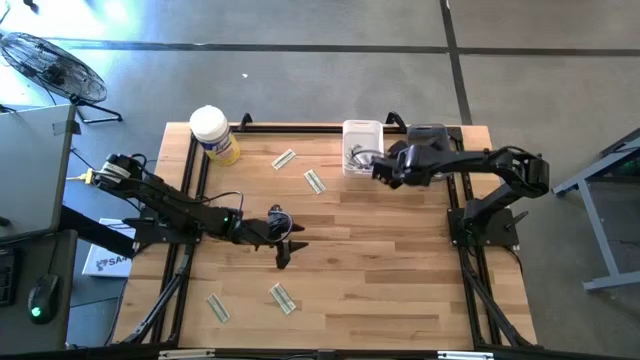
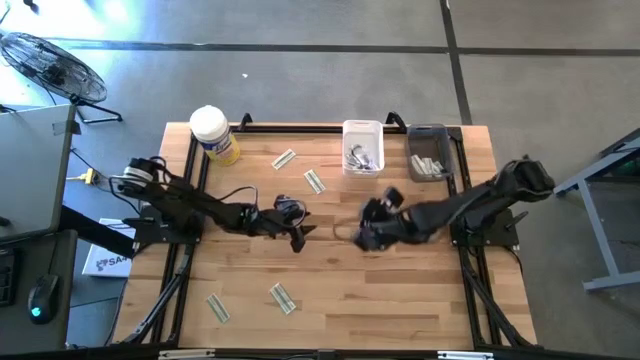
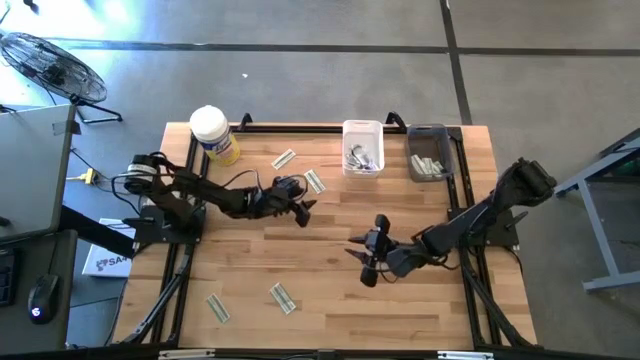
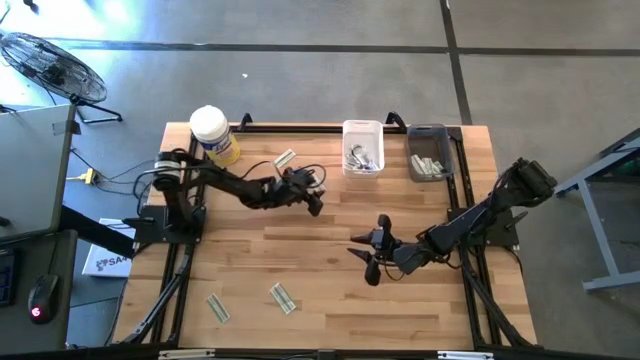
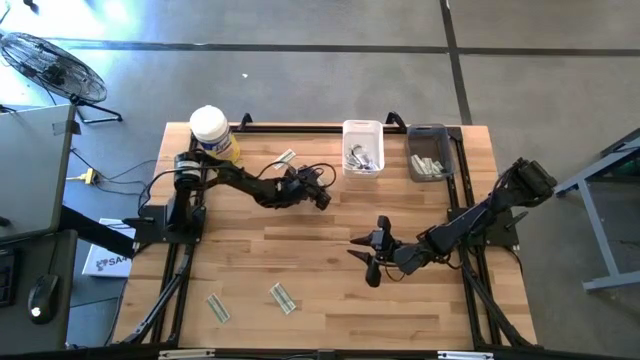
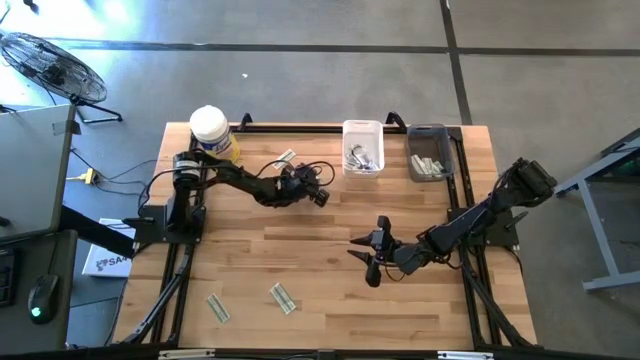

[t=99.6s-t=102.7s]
Task: Pick & Place First Aid Supplies
Put the green bandage into the black bin

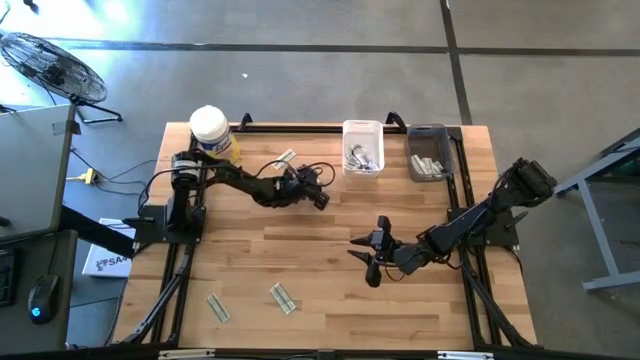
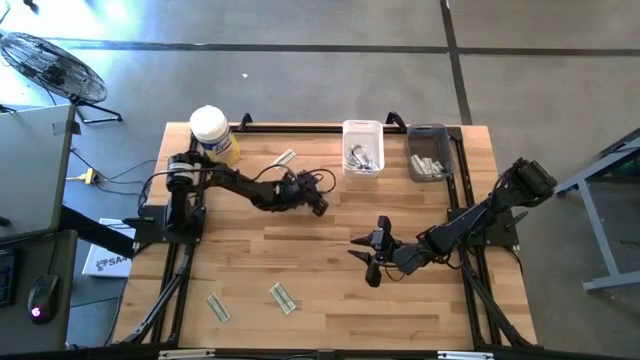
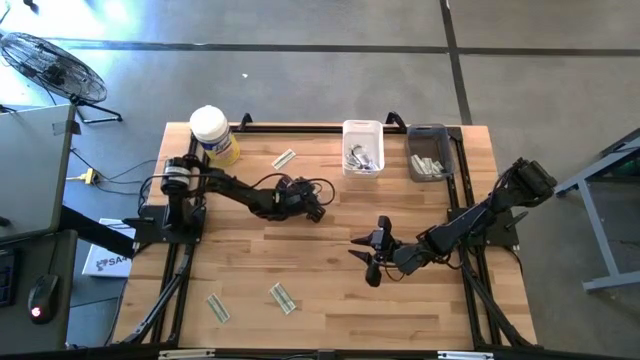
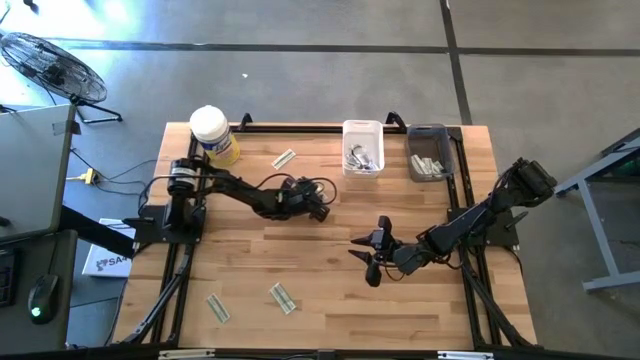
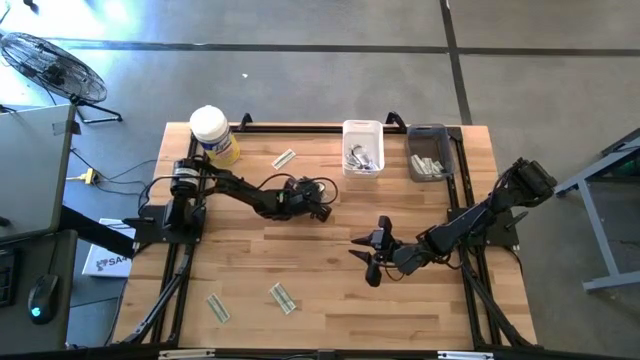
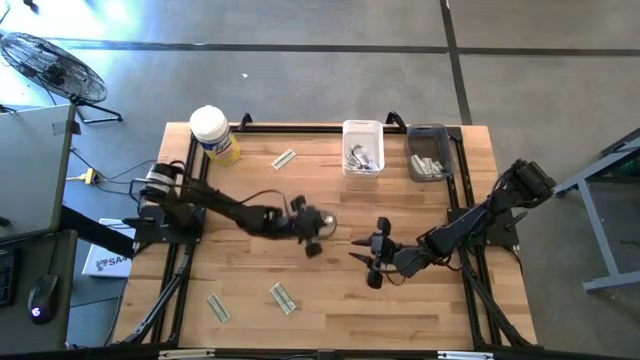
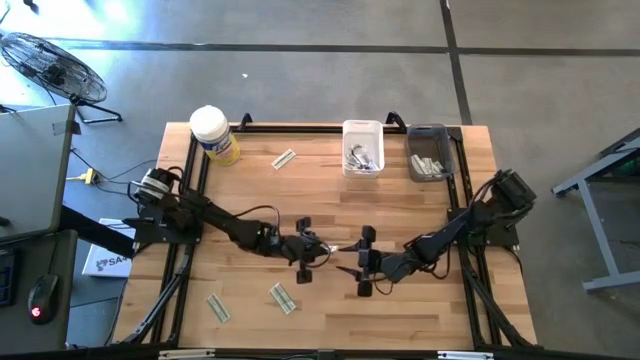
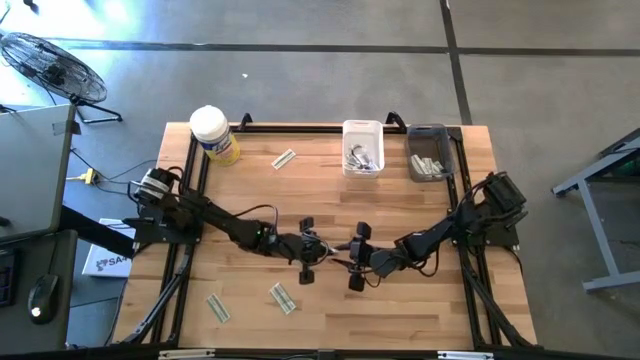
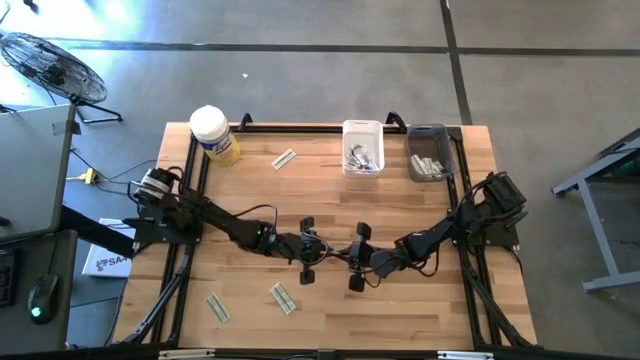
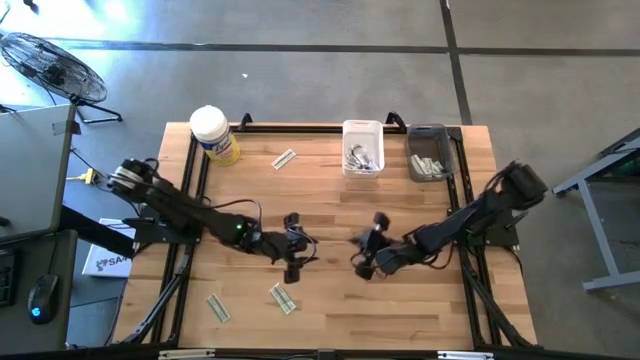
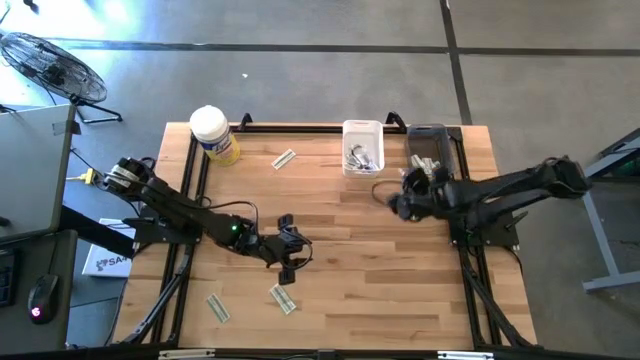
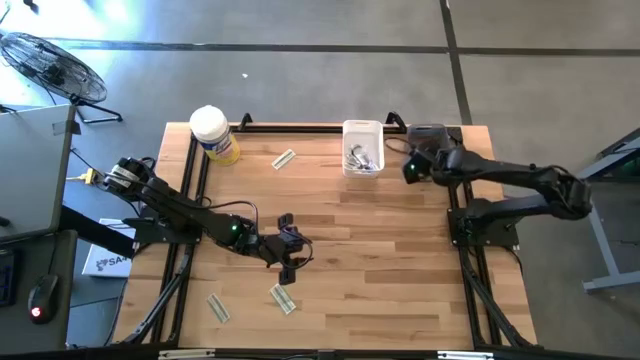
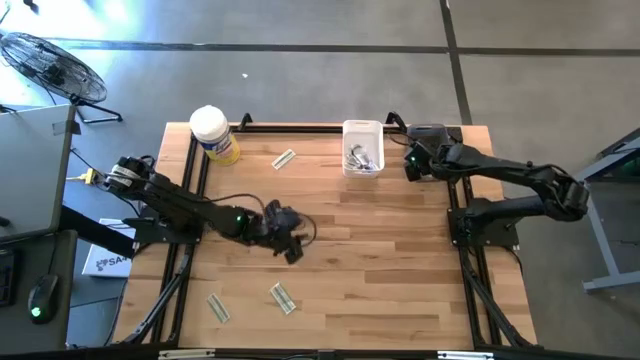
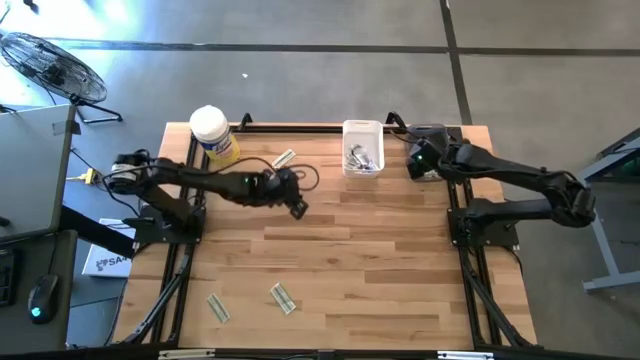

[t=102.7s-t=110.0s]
Put the green bandage into the black bin

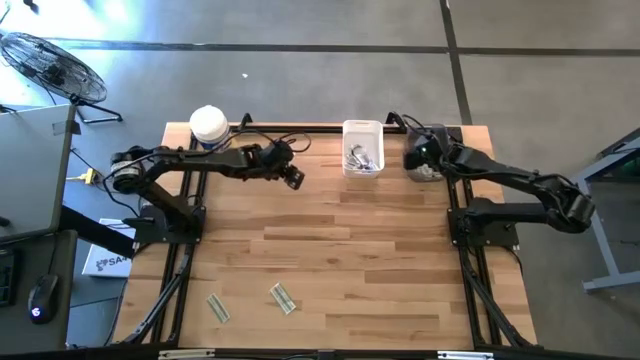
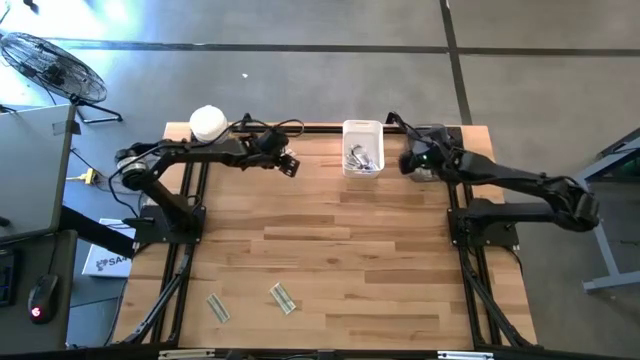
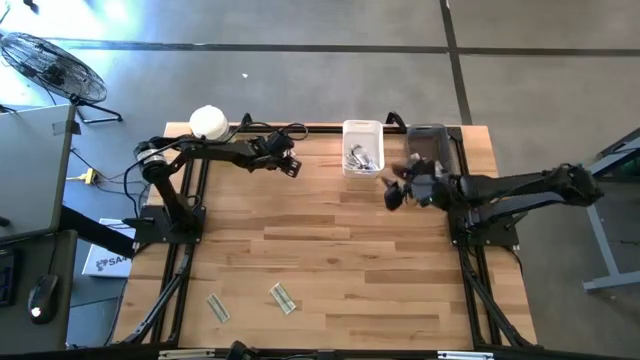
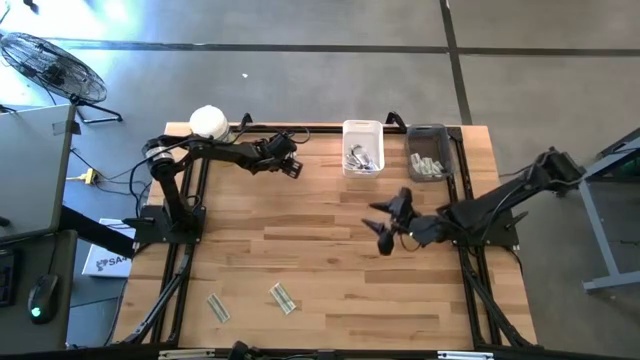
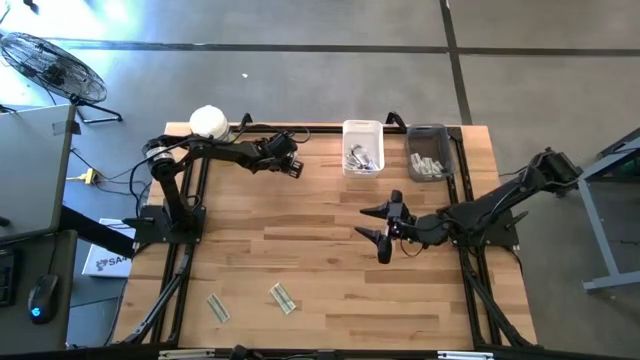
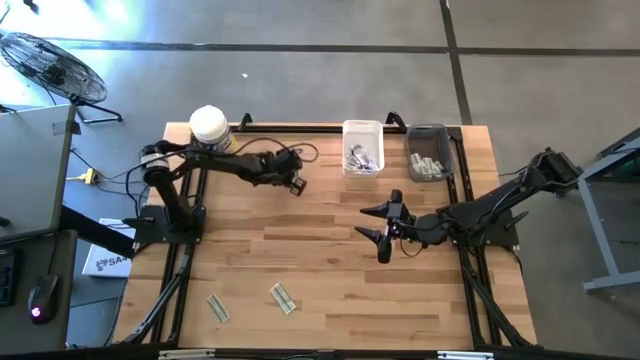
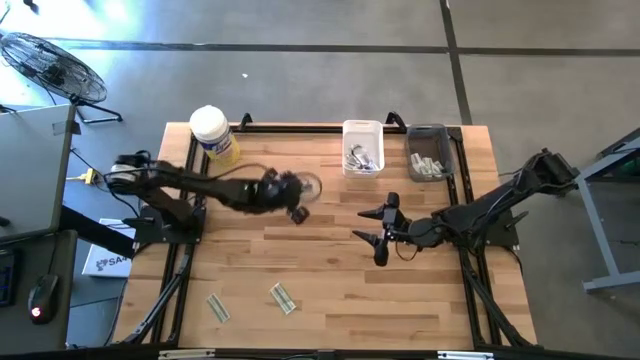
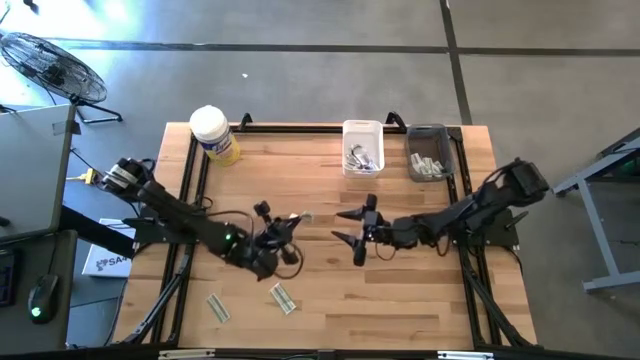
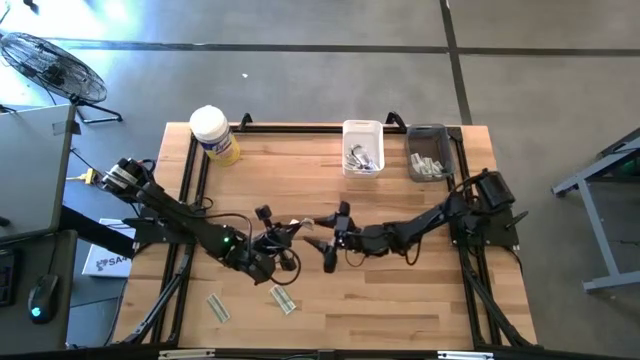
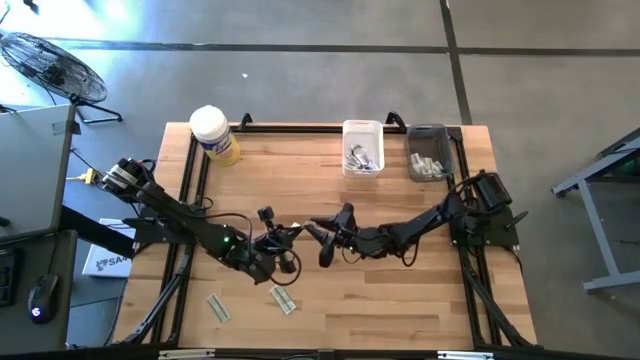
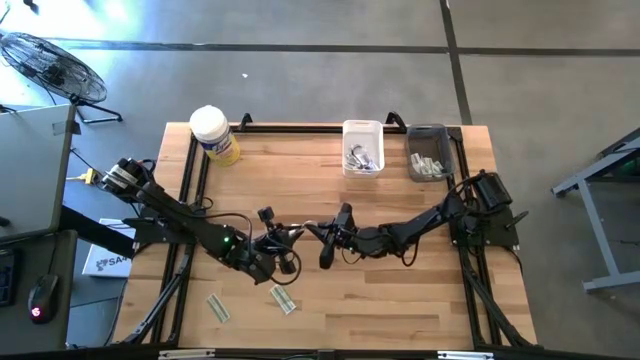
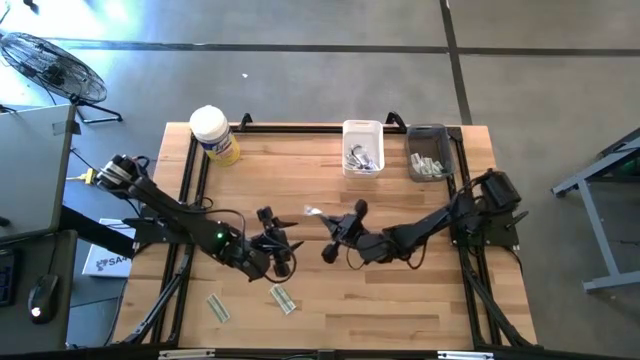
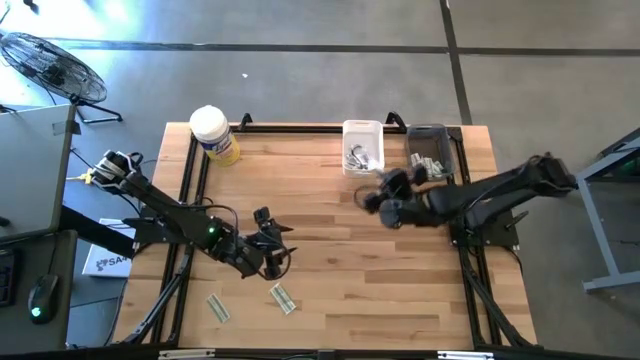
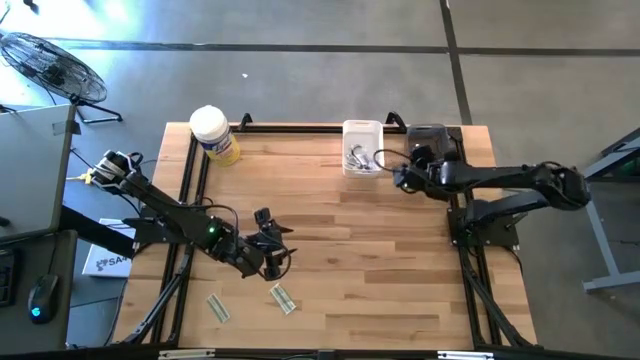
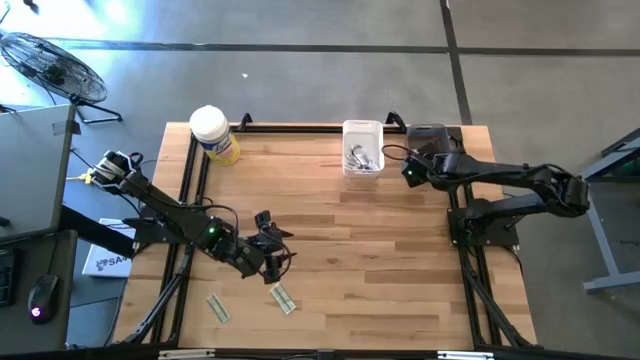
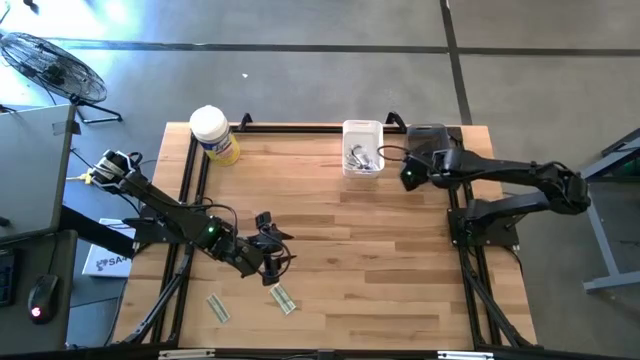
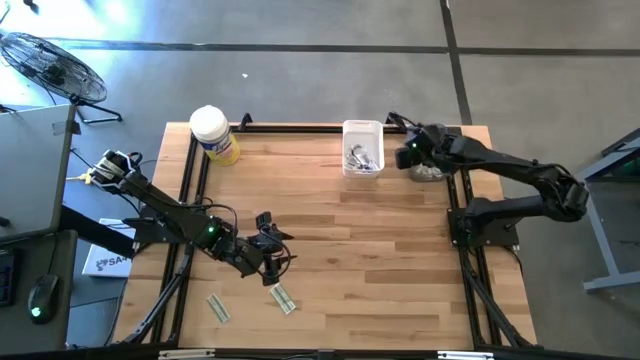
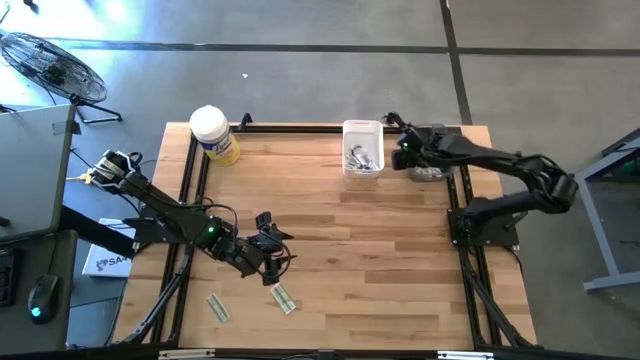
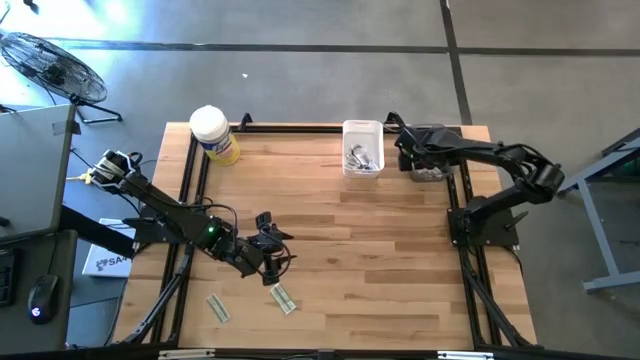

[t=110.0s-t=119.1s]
Put the green bandage into the black bin

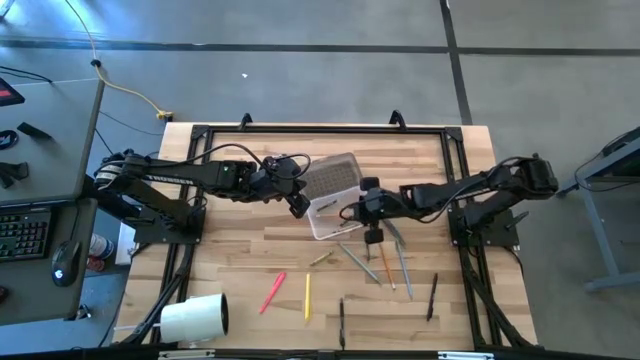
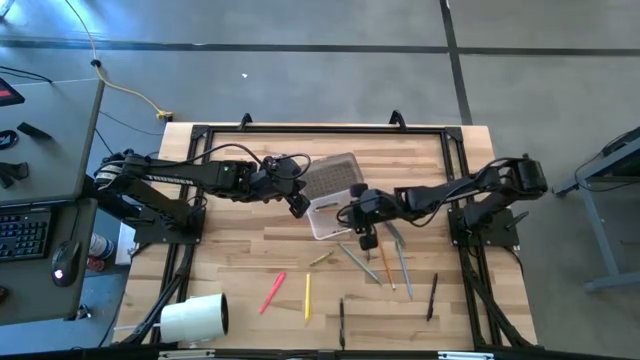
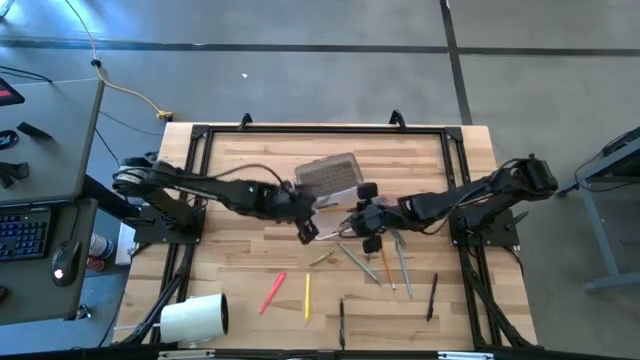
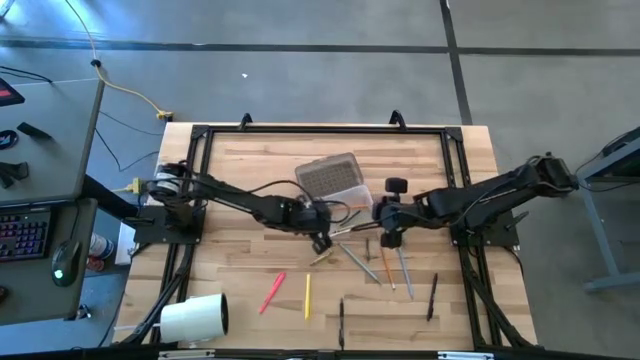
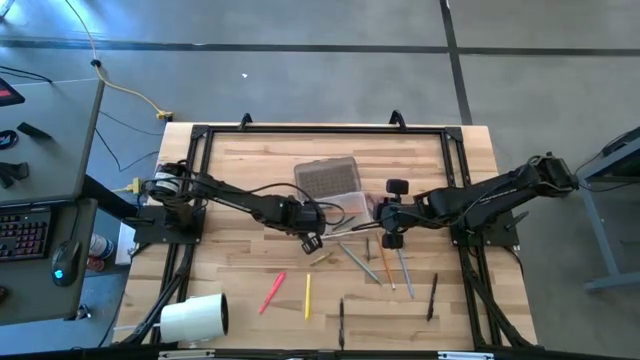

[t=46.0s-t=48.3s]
Task: Pick & place school supplies into a supply box
Adjust the black supply box on the table
